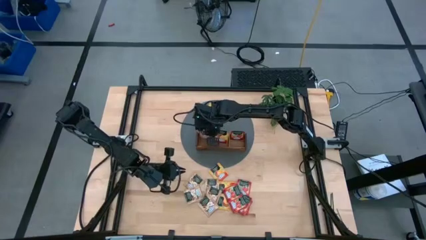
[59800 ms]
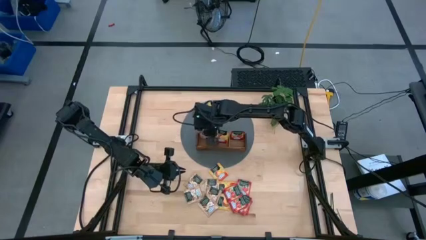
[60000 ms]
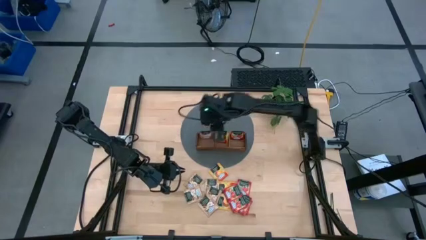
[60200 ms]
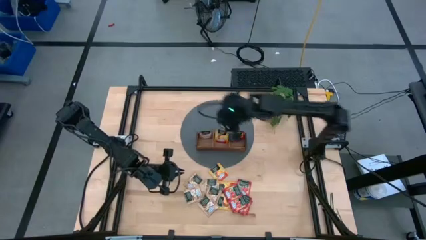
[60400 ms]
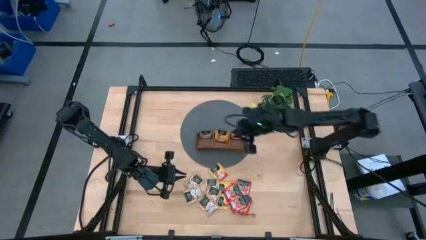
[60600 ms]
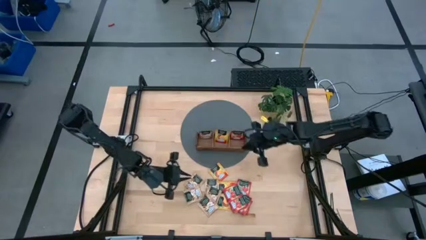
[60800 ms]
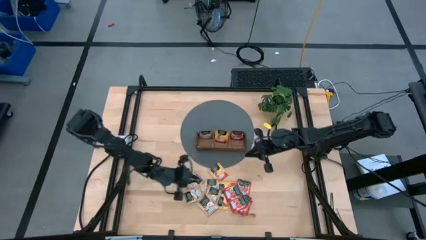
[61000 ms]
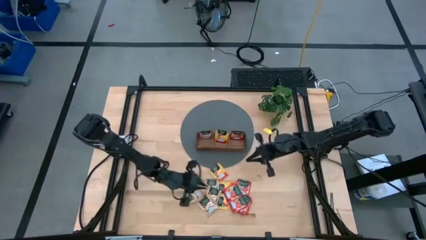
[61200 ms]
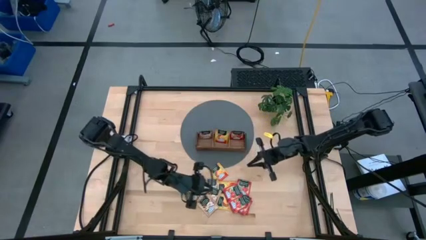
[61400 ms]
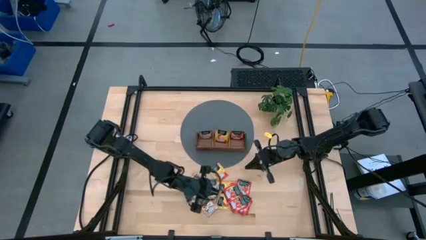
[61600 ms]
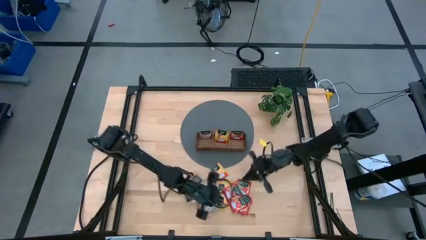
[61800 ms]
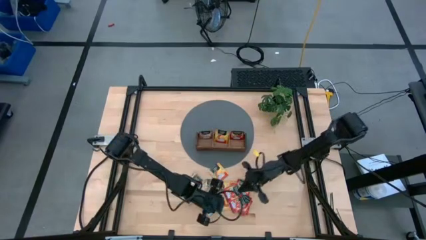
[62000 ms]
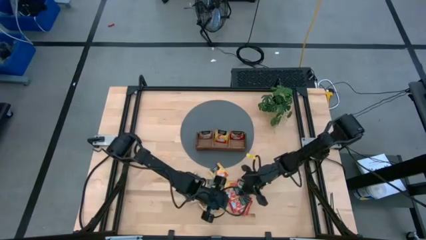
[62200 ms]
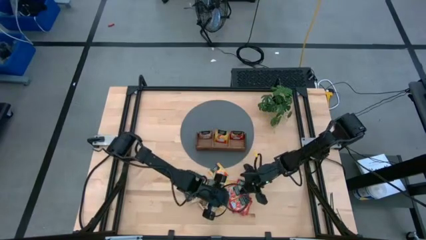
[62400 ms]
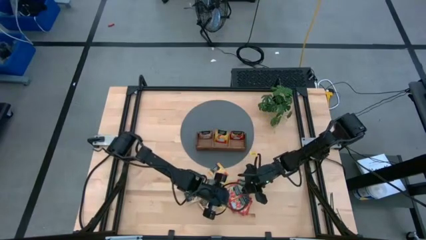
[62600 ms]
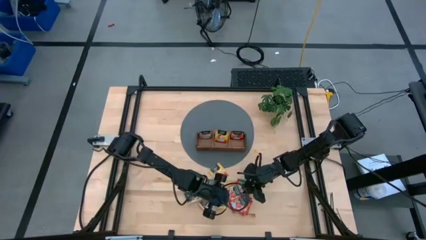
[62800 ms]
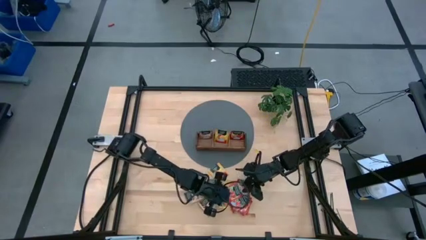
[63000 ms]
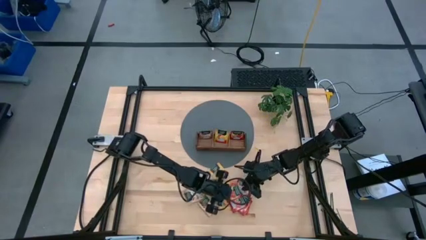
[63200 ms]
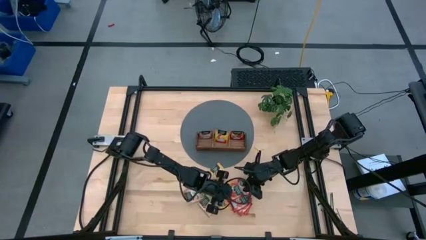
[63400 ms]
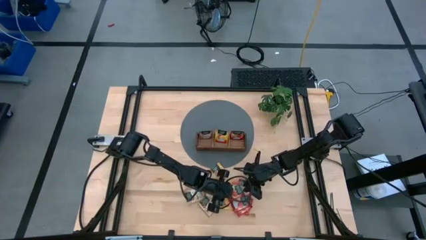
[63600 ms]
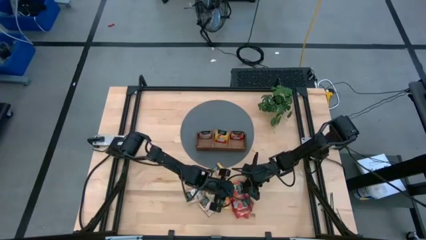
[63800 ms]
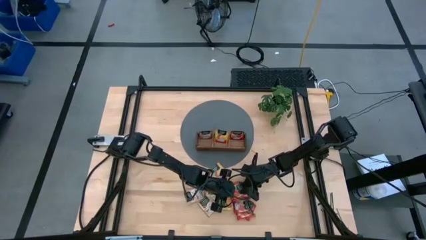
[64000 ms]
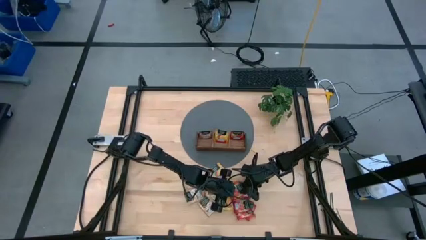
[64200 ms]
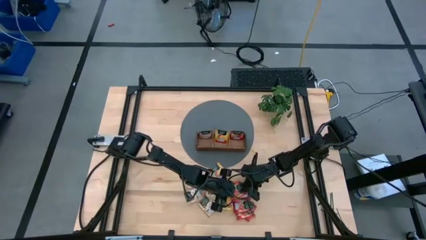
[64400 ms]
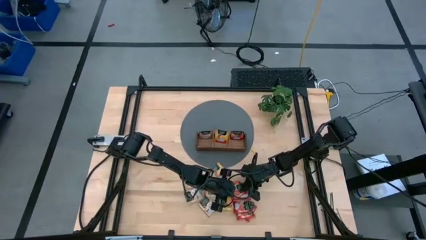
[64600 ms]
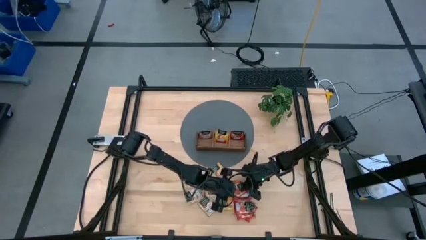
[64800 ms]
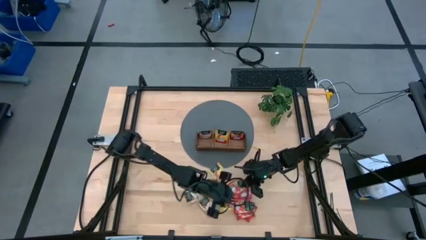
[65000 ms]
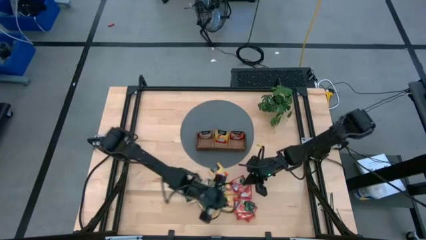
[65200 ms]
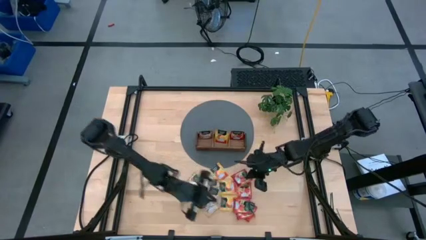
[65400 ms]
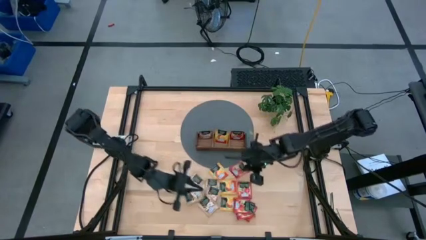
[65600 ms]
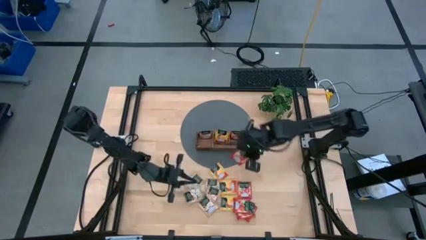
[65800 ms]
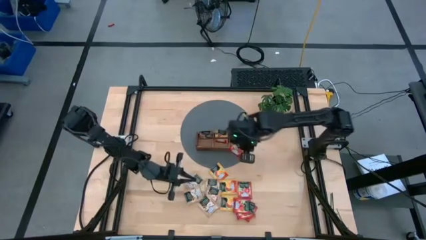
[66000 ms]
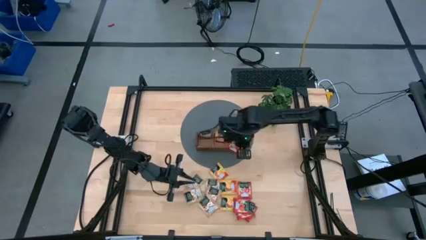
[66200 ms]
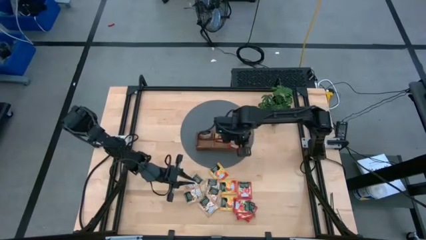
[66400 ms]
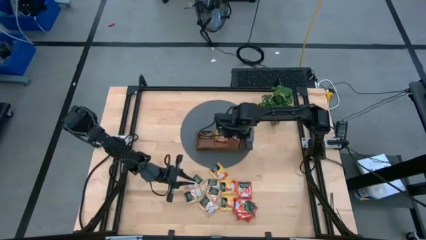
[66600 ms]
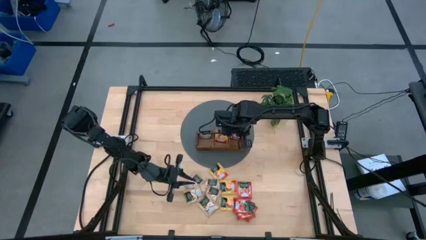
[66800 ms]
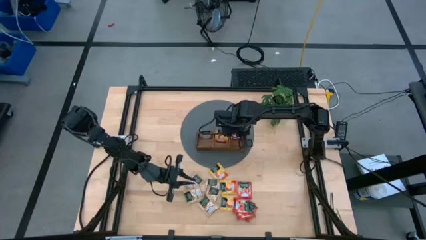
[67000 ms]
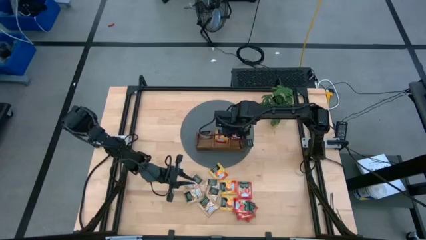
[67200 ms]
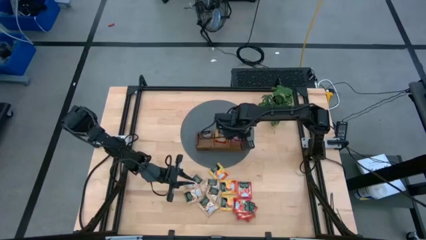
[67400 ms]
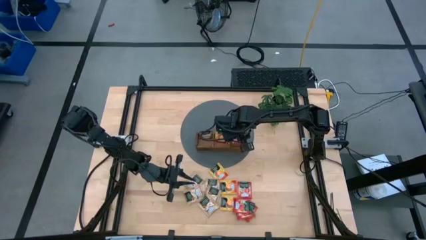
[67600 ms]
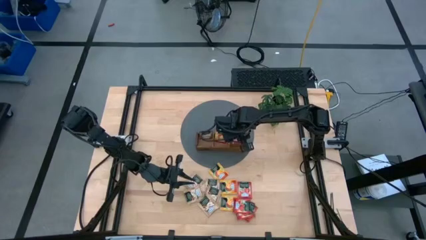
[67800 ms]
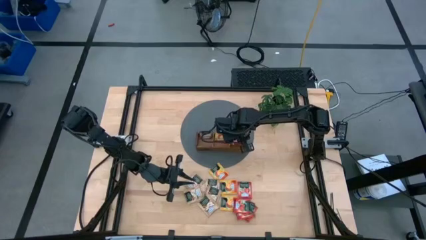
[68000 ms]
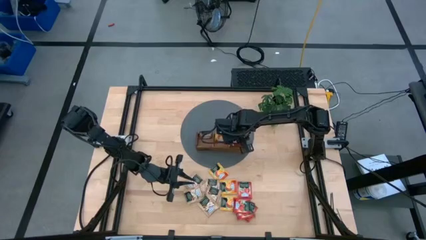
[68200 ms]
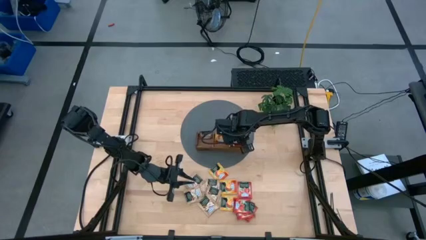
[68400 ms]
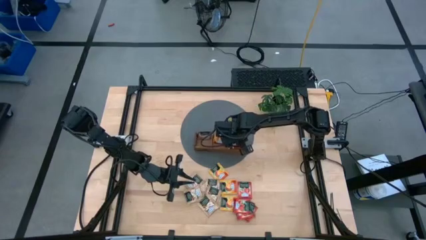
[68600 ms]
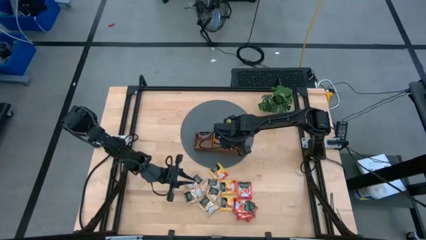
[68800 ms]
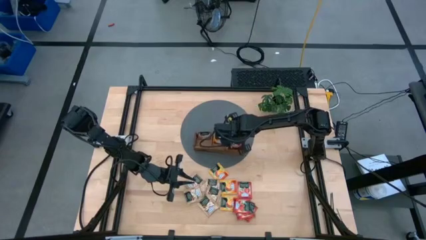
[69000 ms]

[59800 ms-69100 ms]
Task: Pick & Place Tea
Put the red tea bag into the right section of the wooden organizer

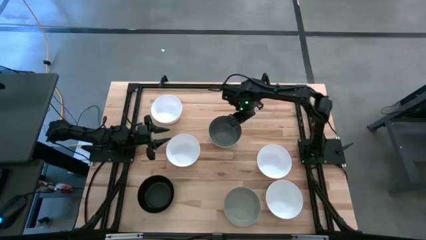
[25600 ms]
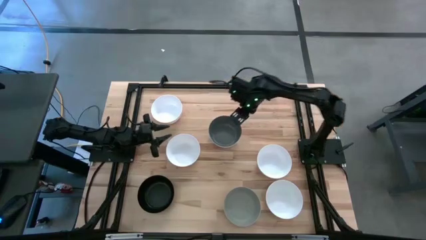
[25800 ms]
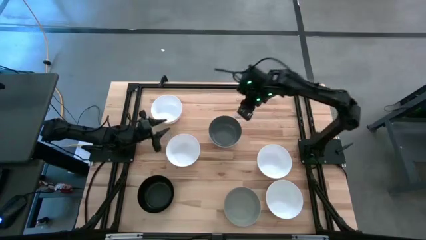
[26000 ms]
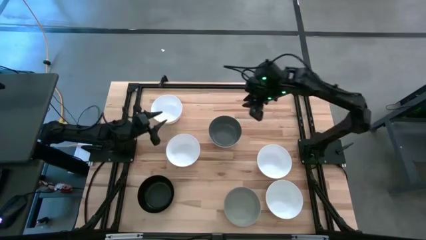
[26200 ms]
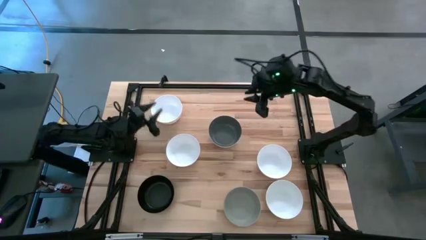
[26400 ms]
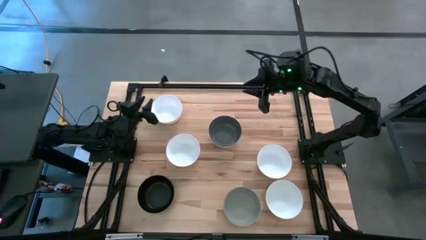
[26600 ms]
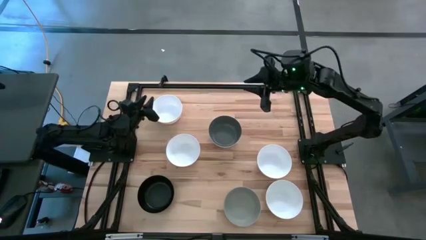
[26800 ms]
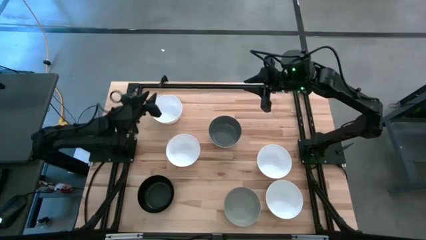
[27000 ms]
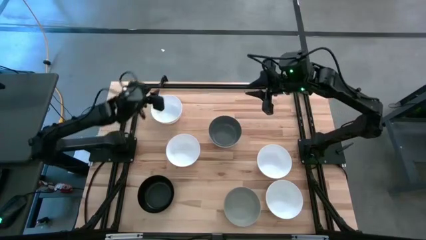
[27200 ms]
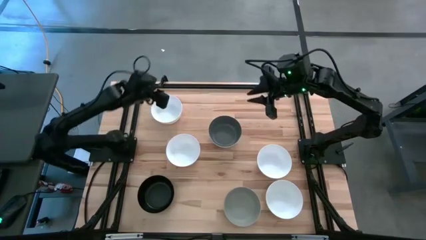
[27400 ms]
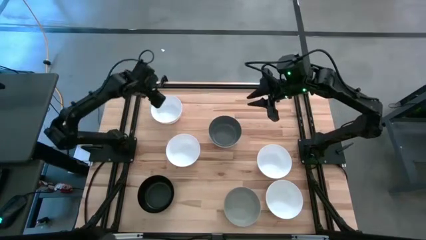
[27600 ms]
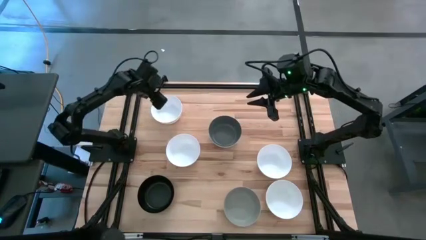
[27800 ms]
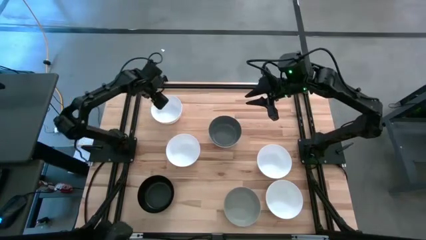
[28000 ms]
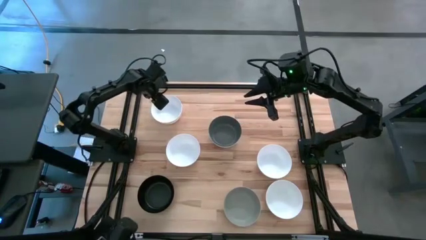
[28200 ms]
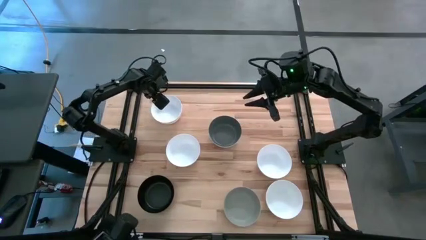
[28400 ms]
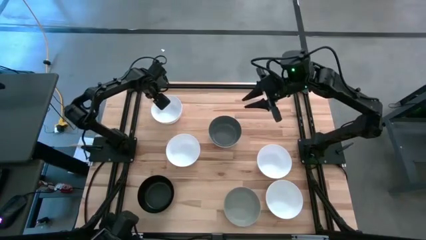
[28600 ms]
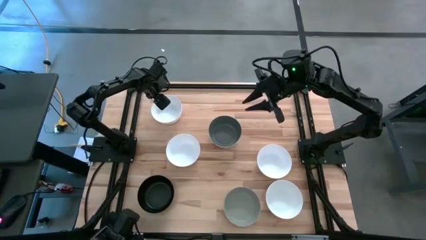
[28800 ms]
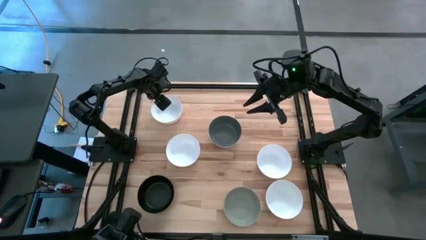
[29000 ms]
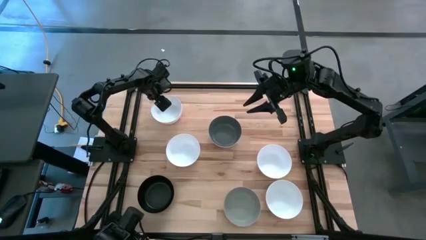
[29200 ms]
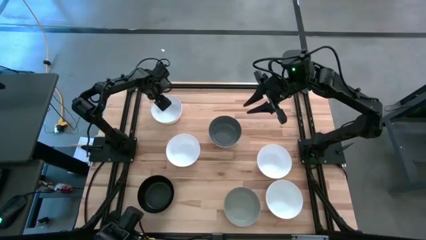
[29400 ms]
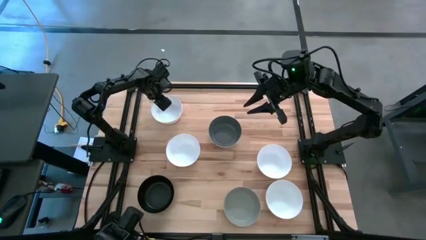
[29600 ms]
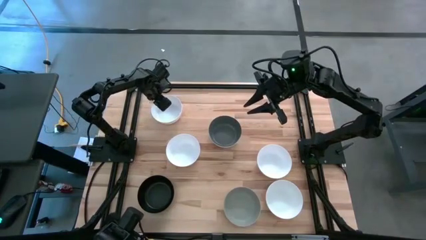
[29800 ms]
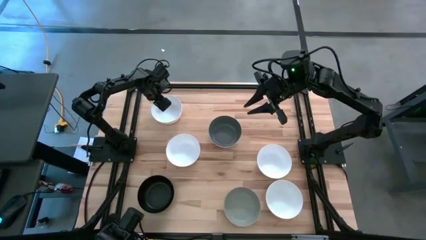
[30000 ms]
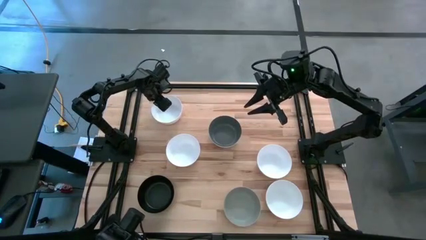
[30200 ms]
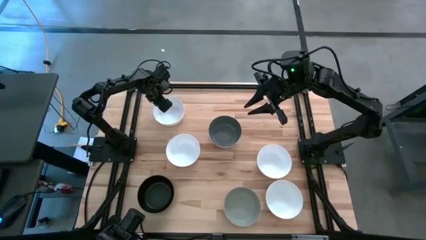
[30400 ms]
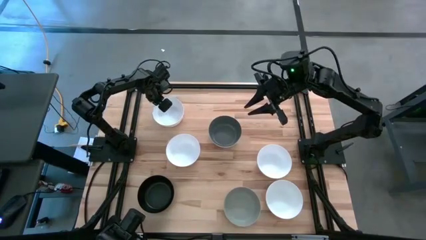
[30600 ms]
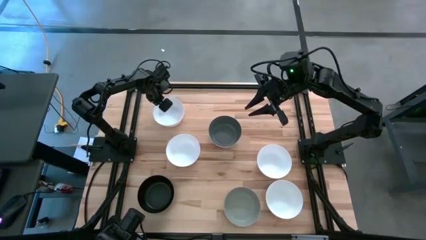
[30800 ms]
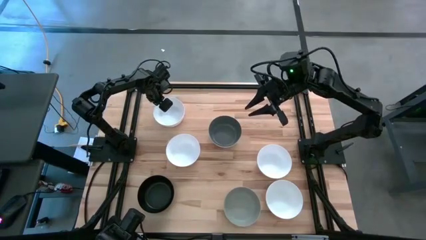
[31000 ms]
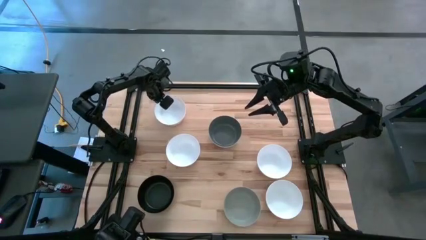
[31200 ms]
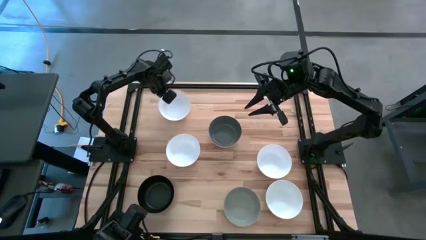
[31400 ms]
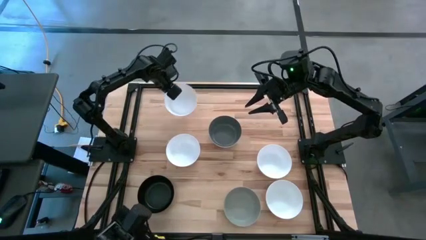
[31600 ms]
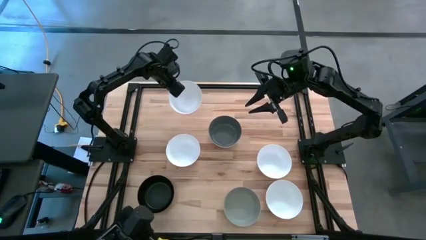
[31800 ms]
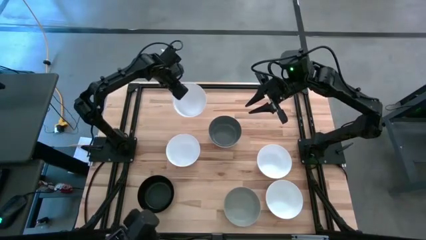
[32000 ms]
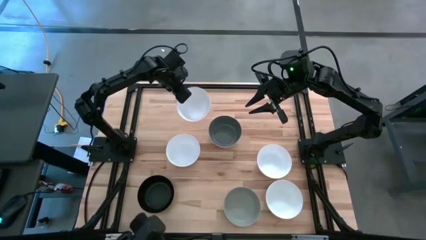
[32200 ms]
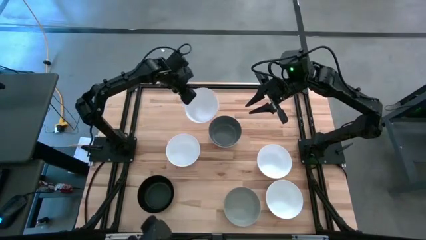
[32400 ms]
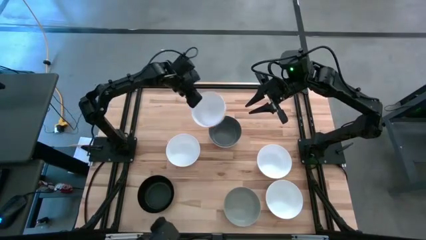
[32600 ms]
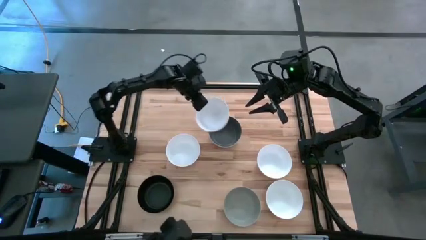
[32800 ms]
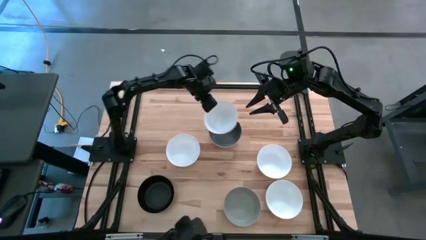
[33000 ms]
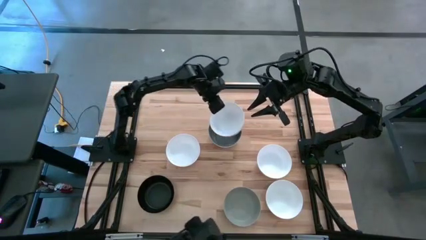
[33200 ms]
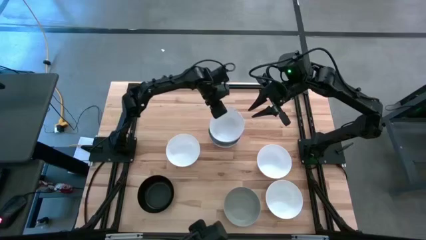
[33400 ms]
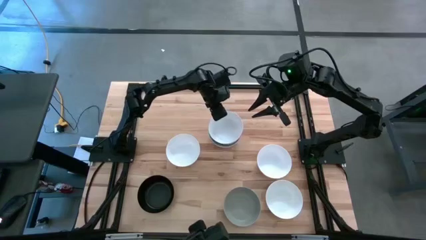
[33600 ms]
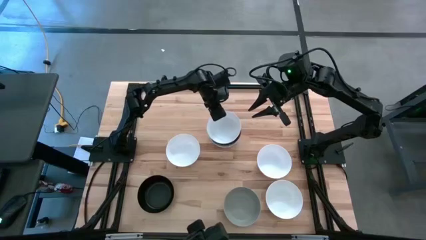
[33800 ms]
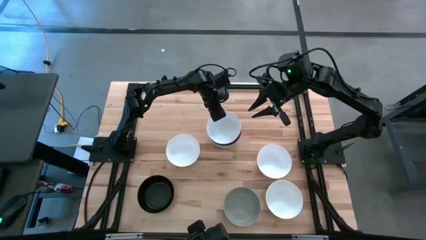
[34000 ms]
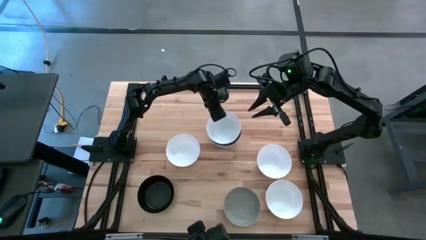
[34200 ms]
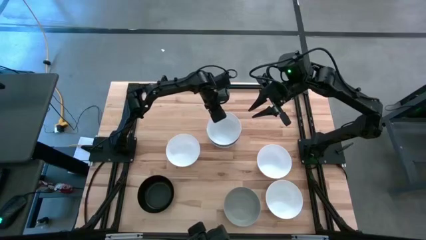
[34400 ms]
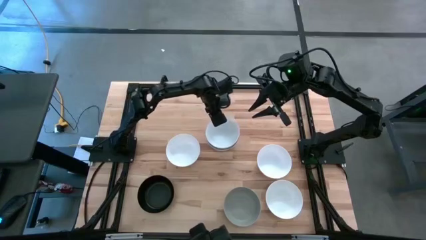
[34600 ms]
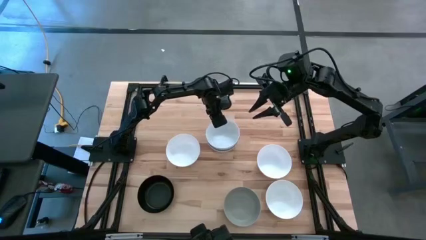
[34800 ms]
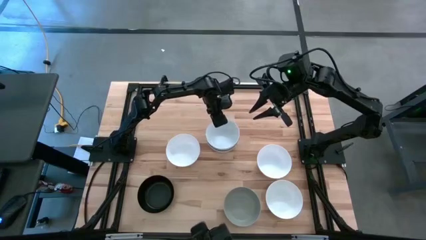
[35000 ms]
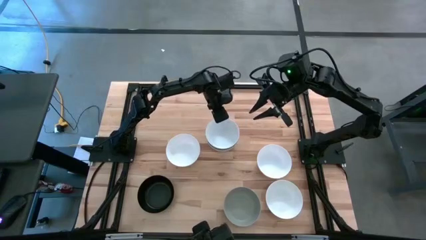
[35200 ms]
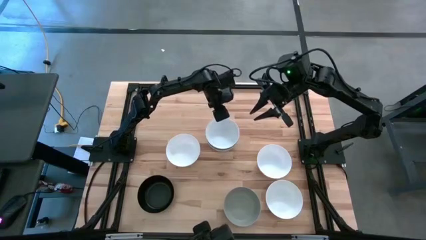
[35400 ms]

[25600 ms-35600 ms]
Task: Nest bowls inside each other
Stack the white bowl on top of the gray bowl
